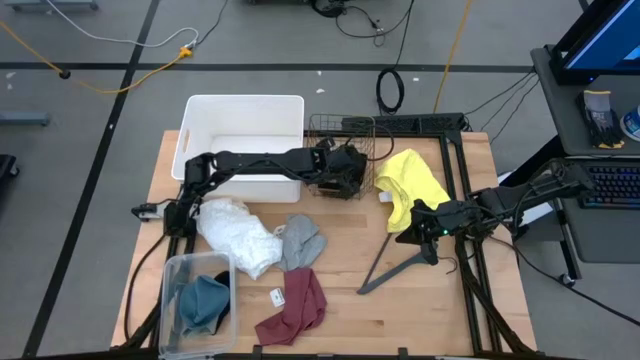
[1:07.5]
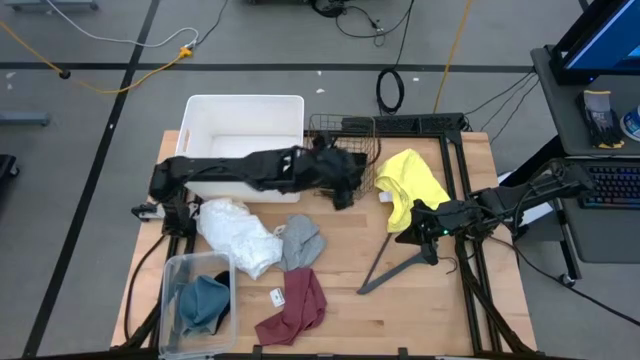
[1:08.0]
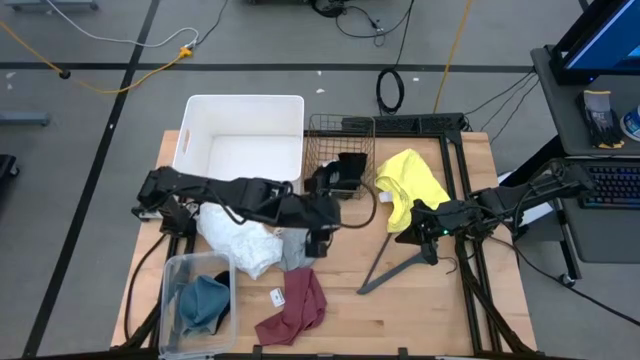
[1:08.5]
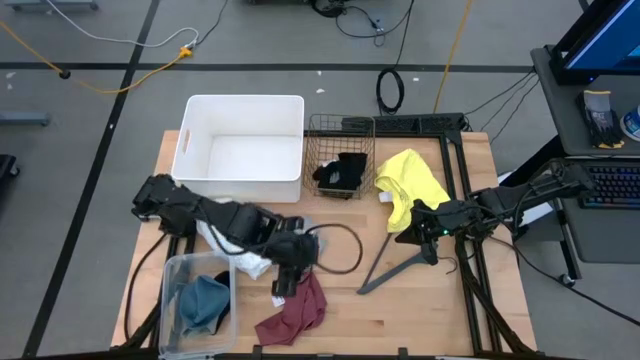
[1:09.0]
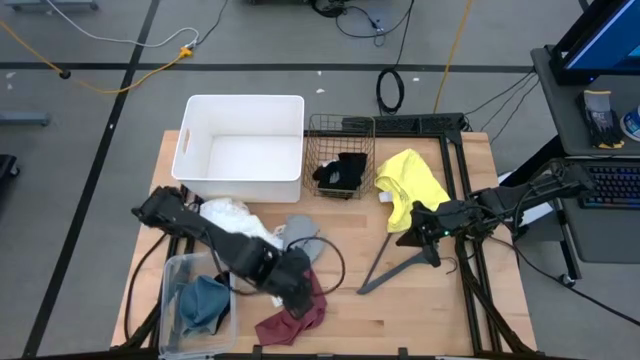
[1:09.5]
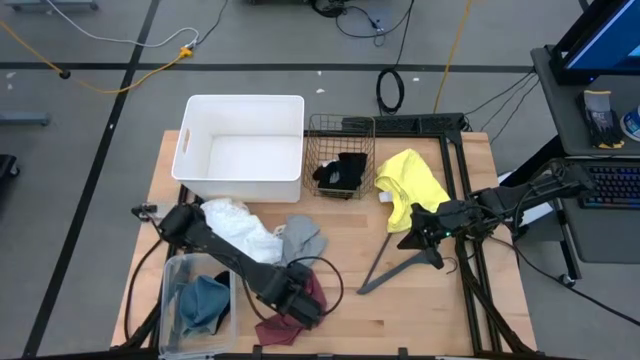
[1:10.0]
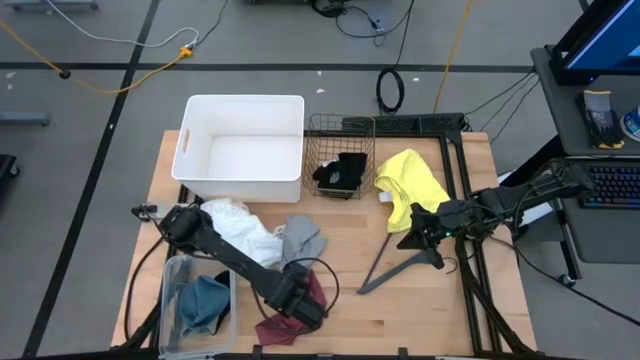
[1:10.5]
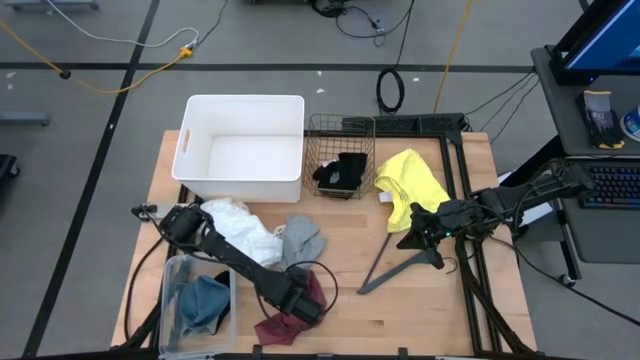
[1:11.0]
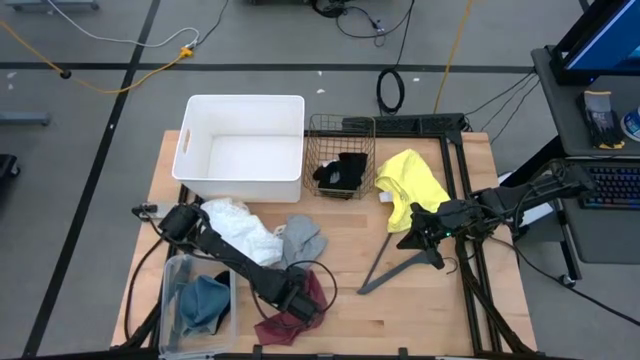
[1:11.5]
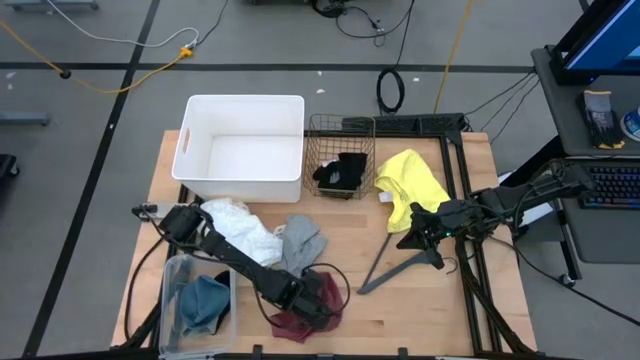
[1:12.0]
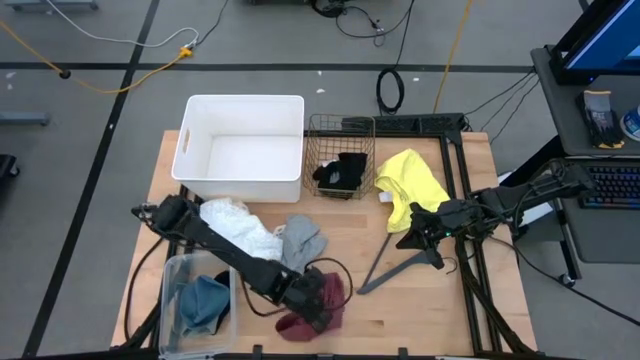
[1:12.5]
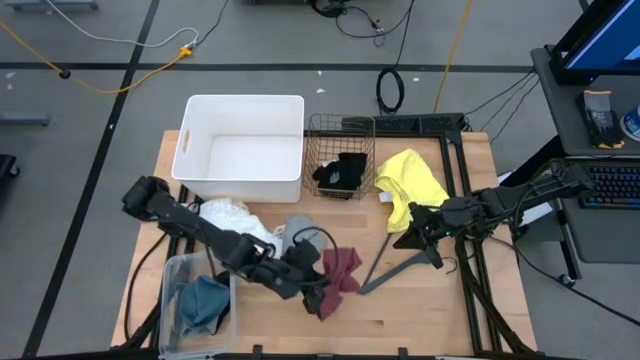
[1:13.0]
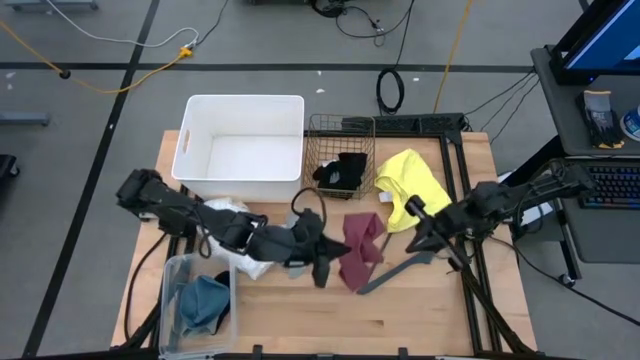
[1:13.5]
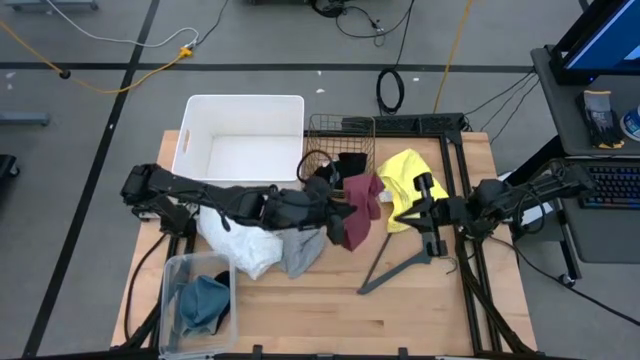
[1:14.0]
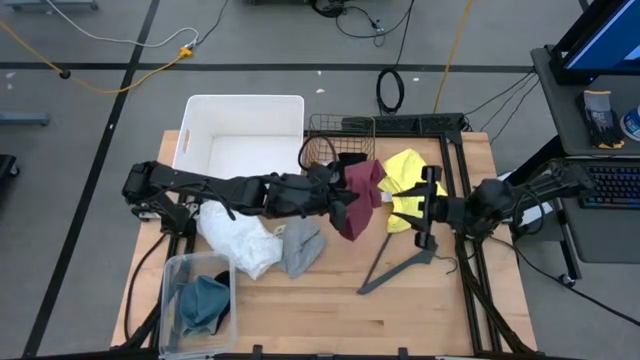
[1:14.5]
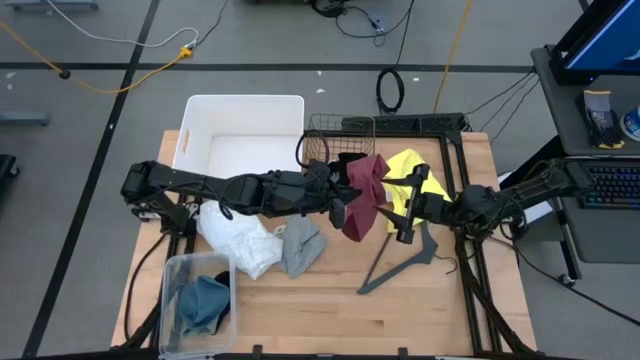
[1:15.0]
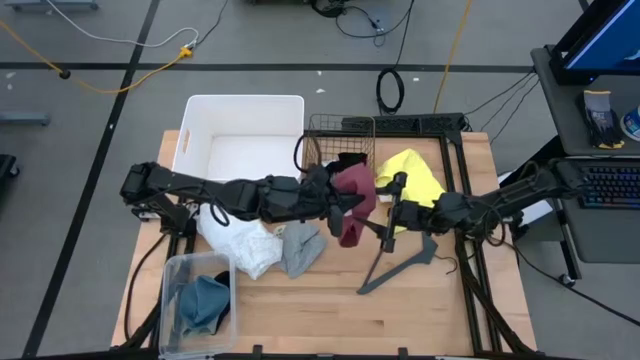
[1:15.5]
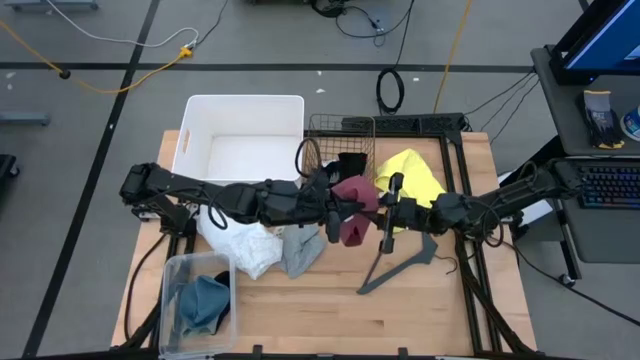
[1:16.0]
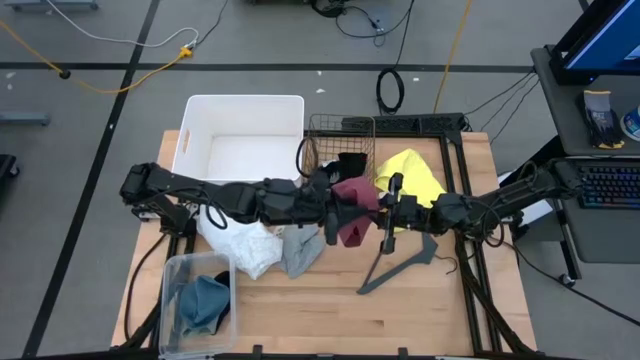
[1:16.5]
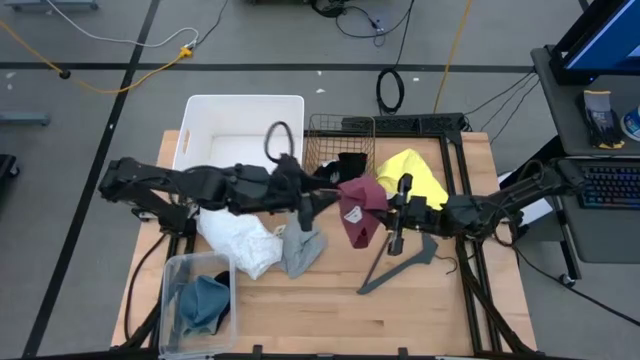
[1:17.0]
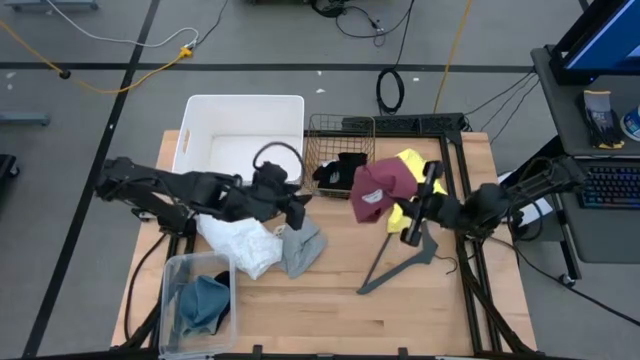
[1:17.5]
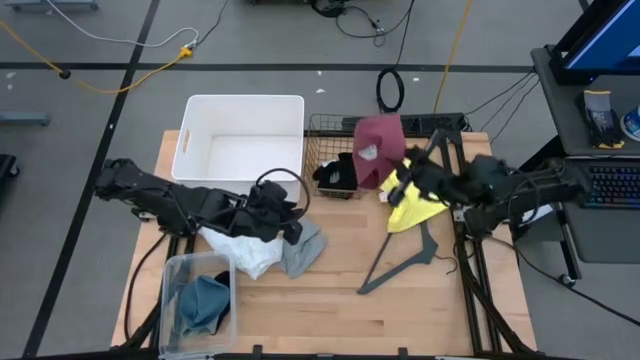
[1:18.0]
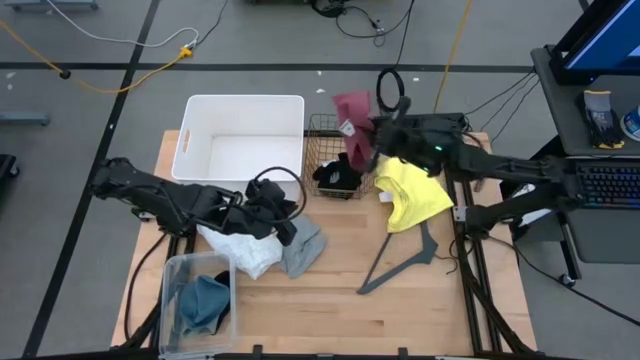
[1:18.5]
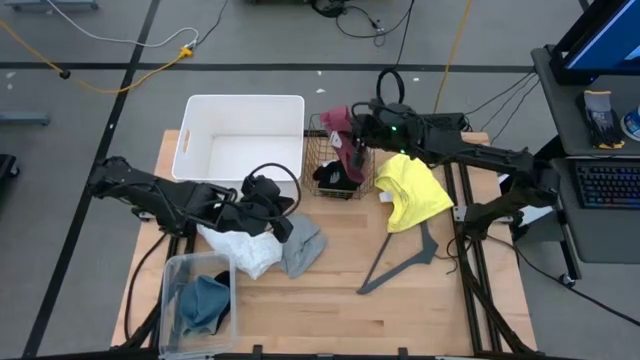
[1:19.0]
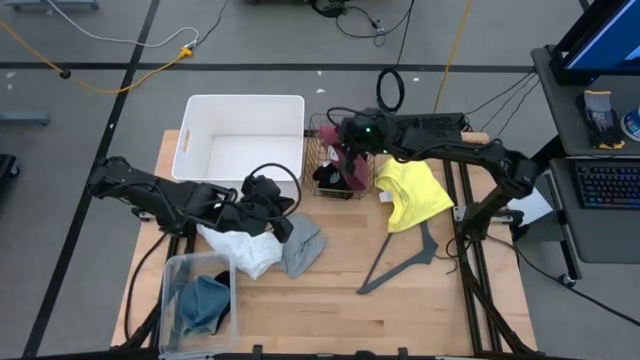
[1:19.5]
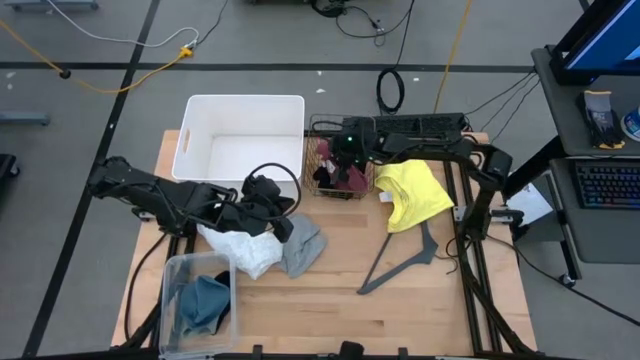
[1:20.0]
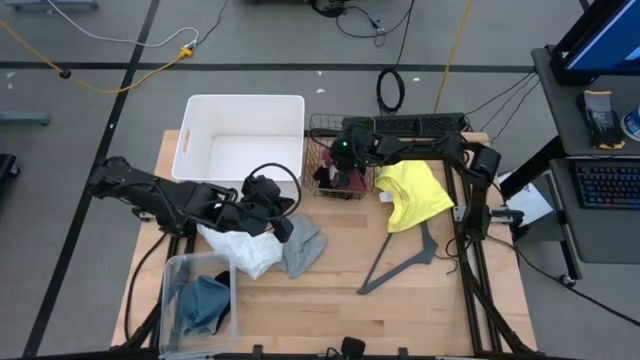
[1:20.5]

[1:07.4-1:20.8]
Task: Pick & Place Cloths
Put the dark pink underwear into the wire basket

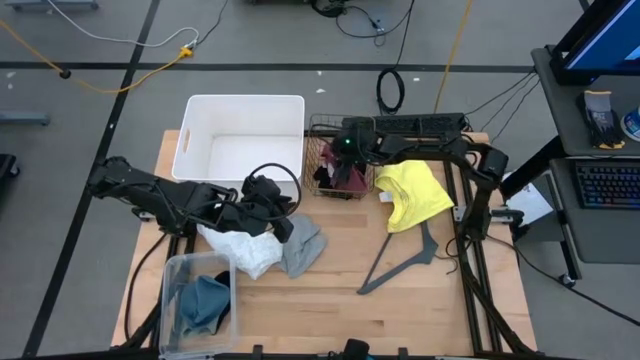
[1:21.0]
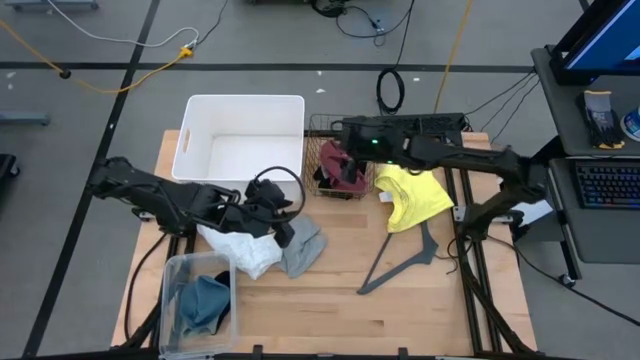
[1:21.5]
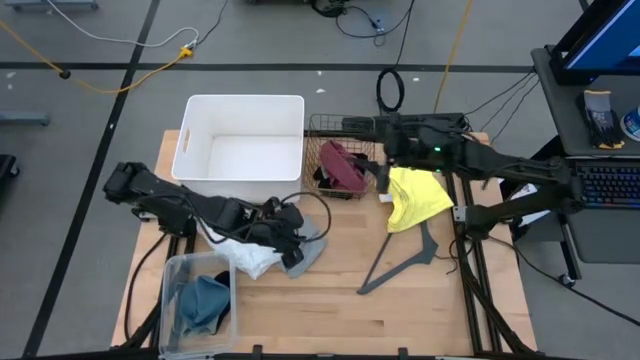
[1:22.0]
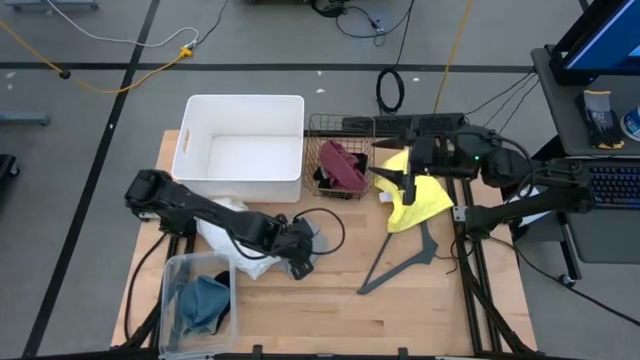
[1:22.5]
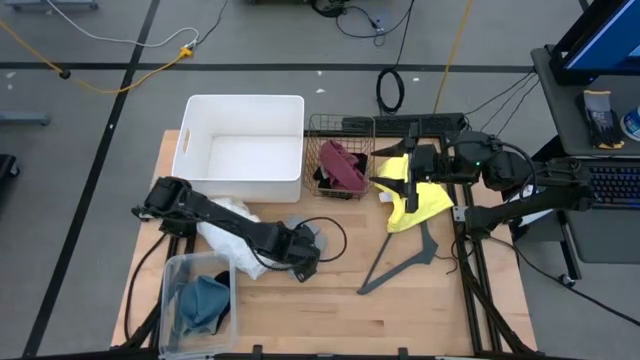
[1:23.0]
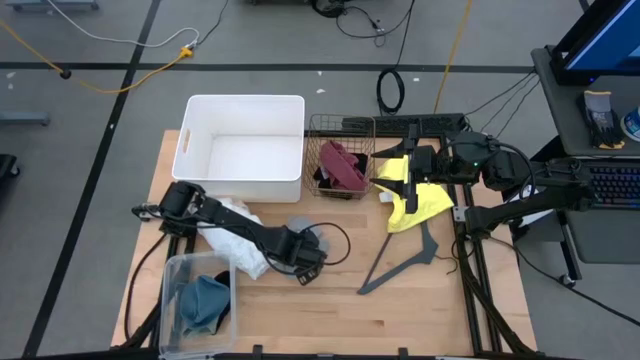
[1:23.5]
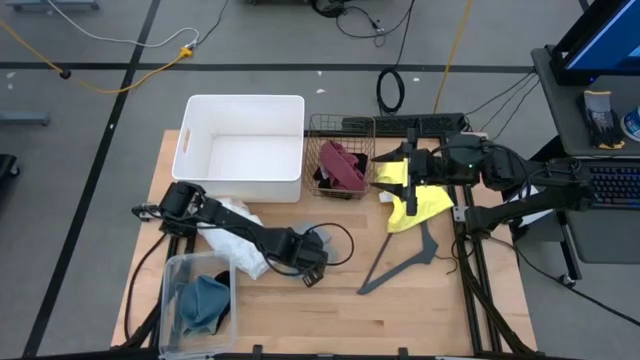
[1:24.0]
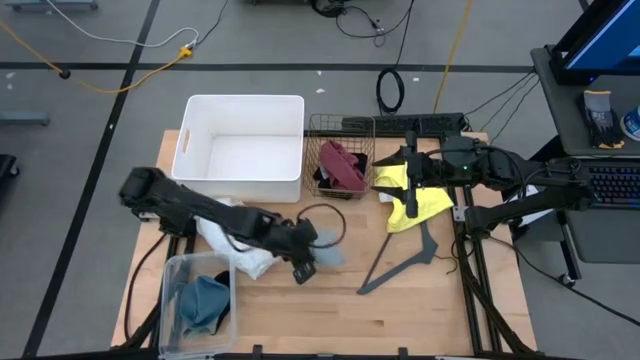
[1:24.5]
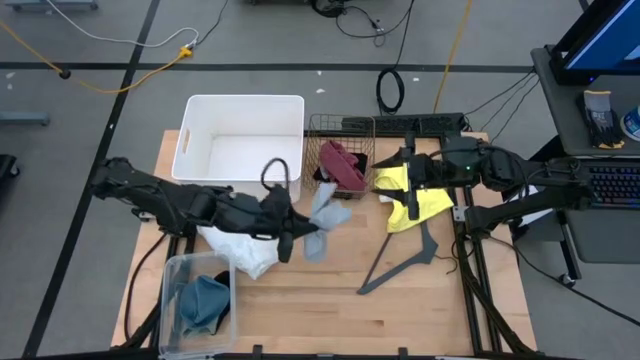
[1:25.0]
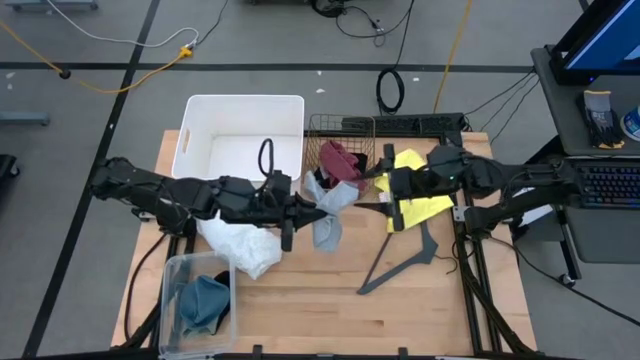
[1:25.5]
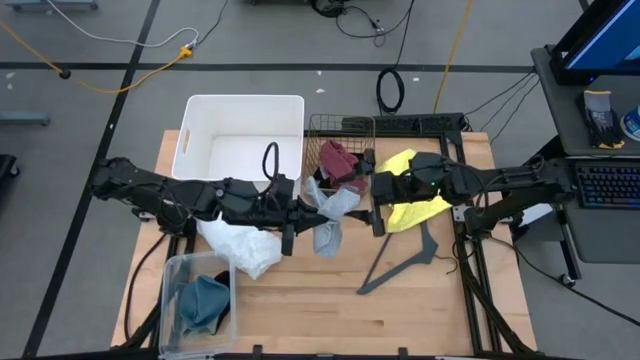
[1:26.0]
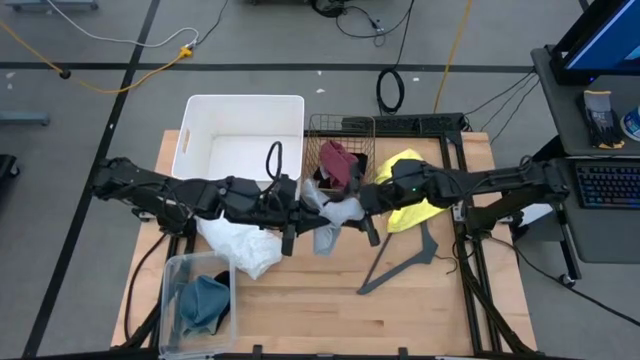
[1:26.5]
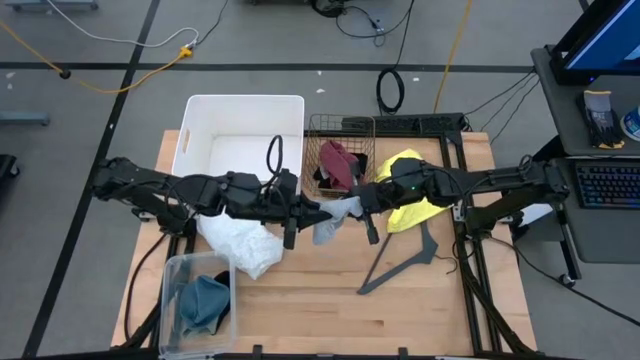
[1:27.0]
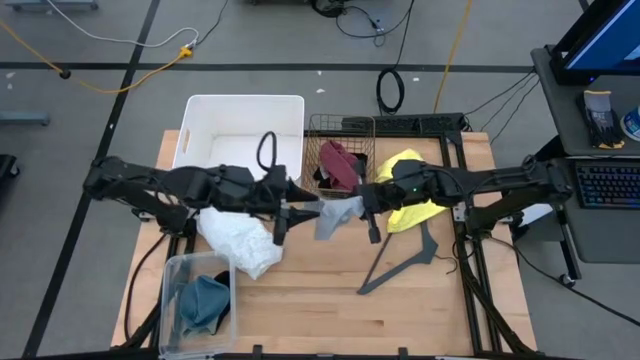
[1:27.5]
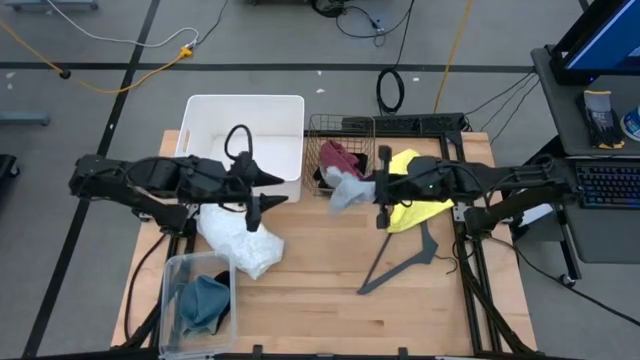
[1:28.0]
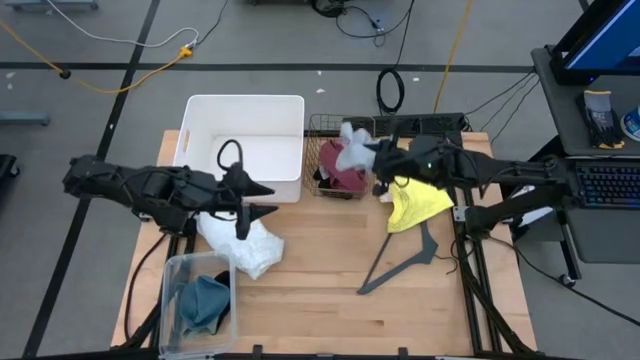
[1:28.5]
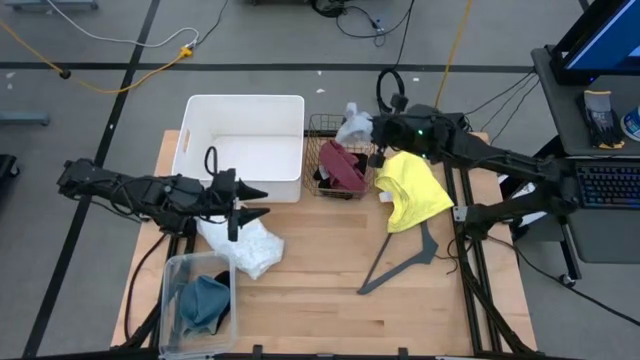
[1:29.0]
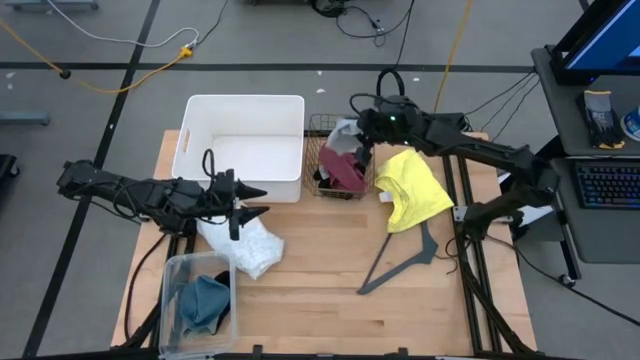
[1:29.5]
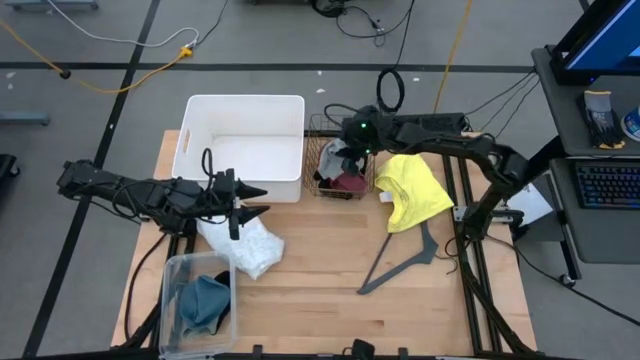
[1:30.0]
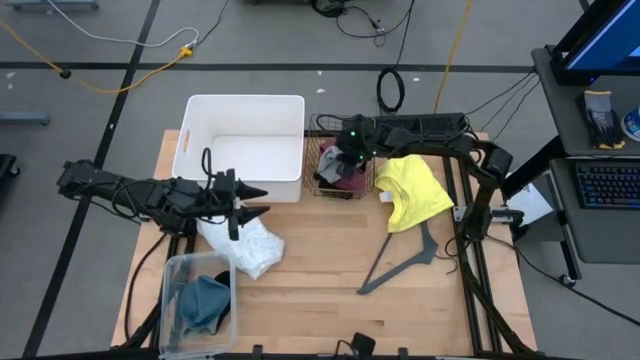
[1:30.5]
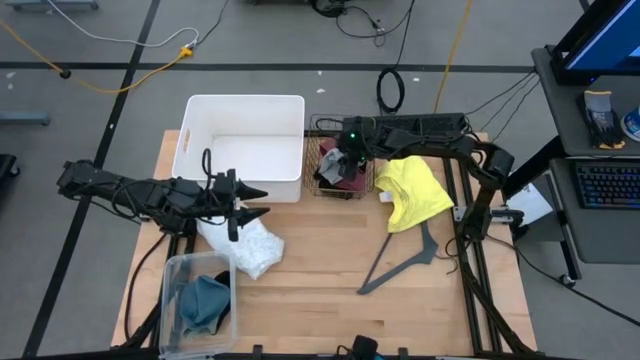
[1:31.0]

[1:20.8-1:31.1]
Put the gray underwear into the wire basket
